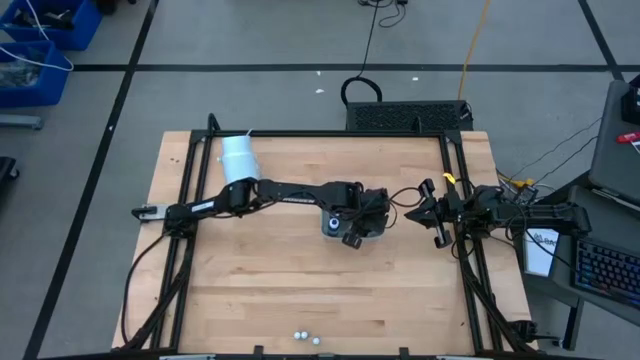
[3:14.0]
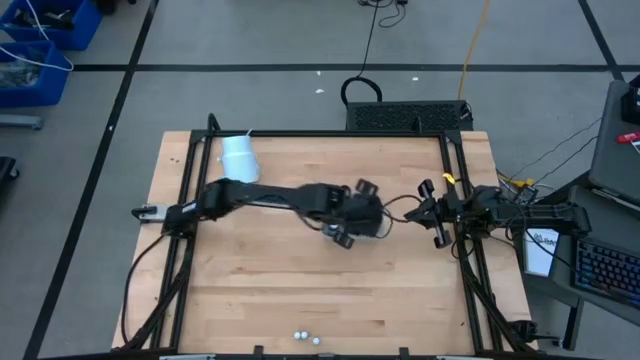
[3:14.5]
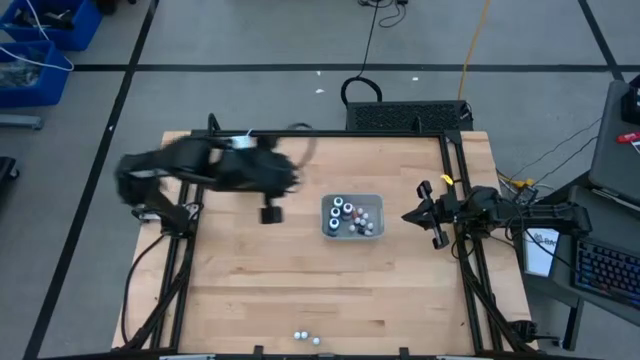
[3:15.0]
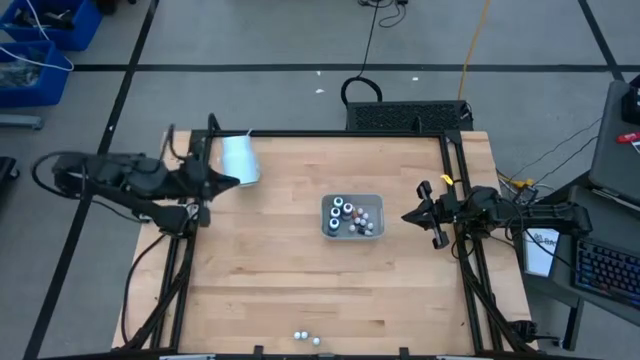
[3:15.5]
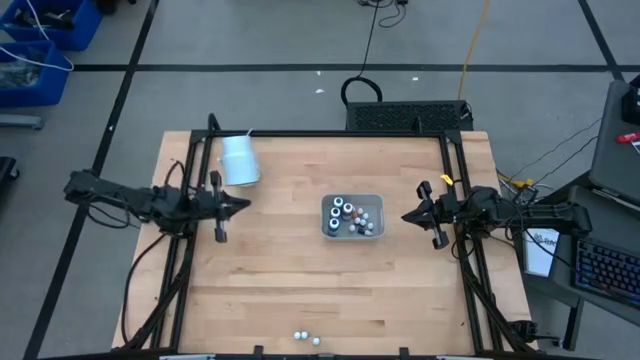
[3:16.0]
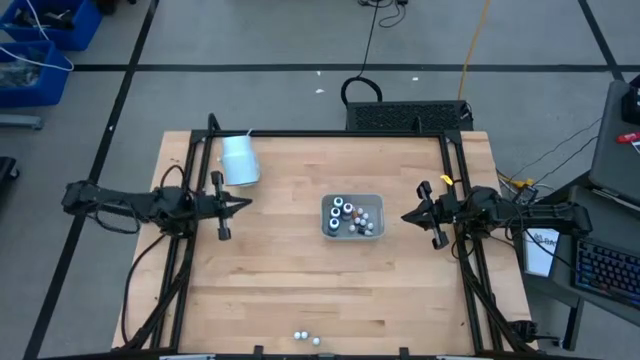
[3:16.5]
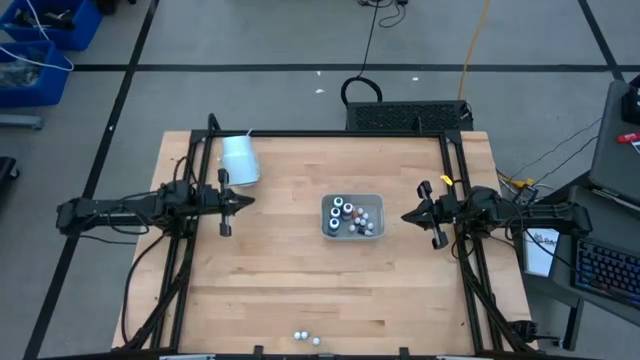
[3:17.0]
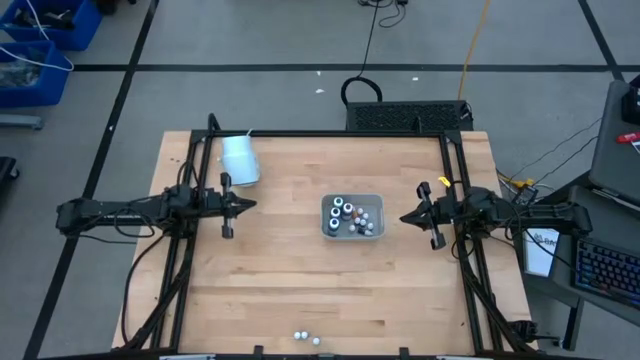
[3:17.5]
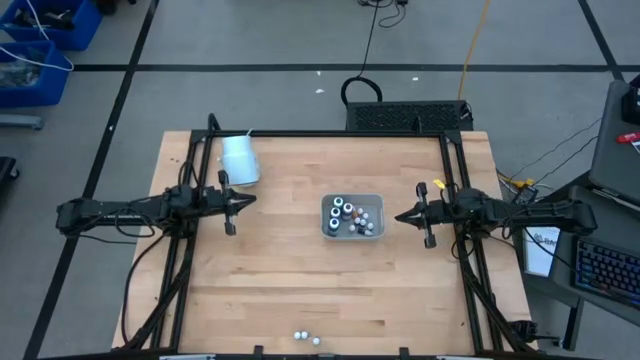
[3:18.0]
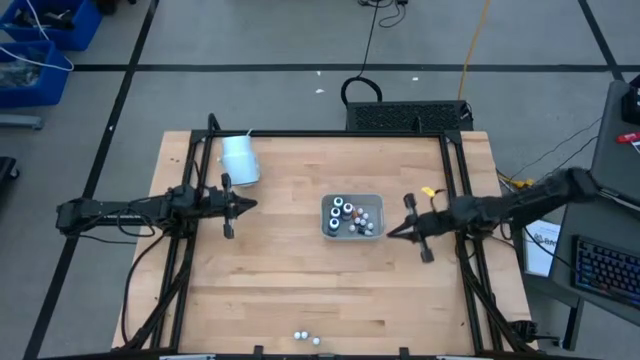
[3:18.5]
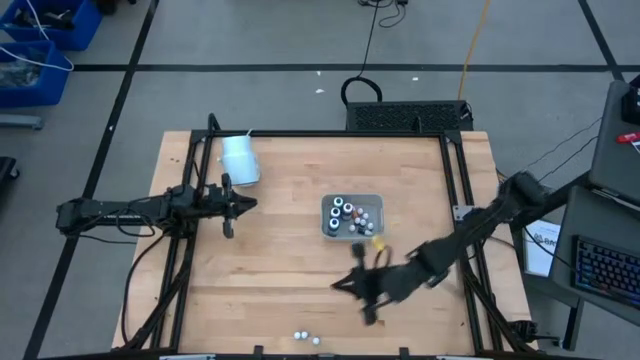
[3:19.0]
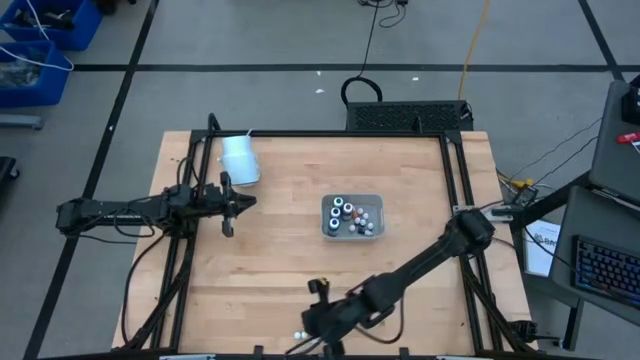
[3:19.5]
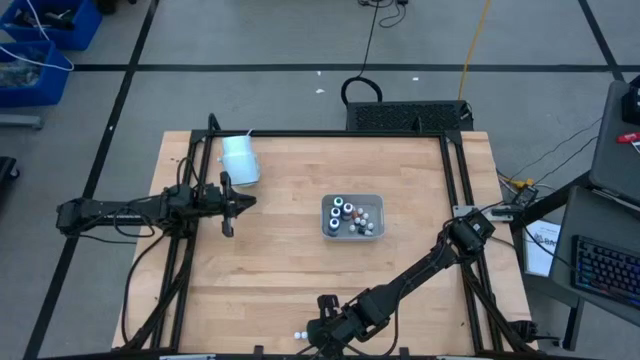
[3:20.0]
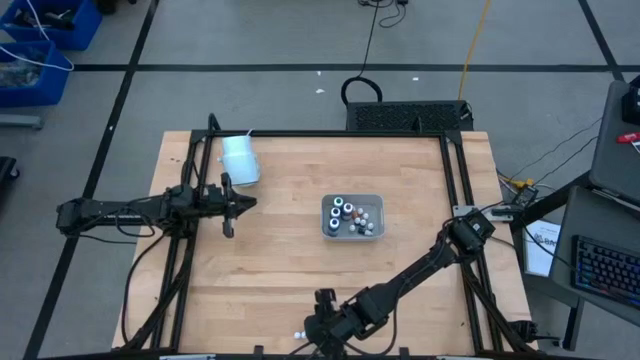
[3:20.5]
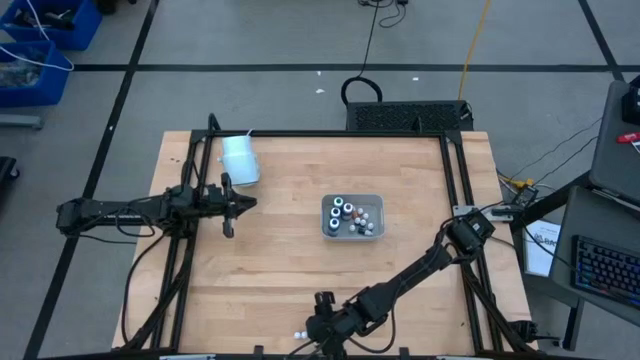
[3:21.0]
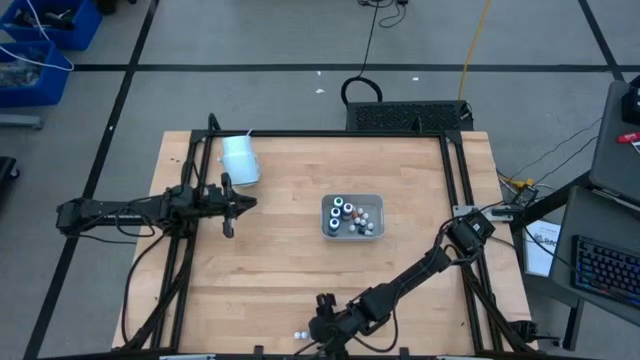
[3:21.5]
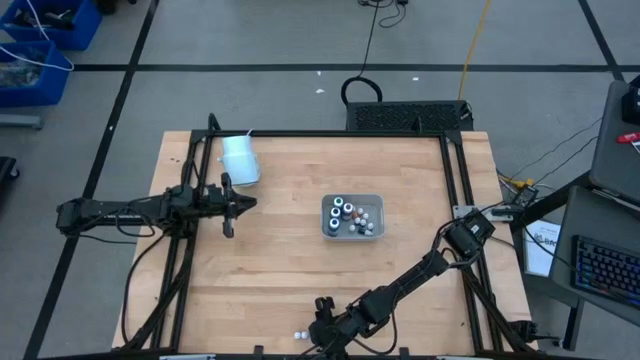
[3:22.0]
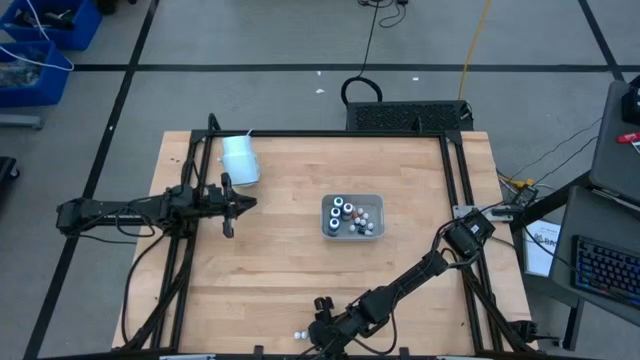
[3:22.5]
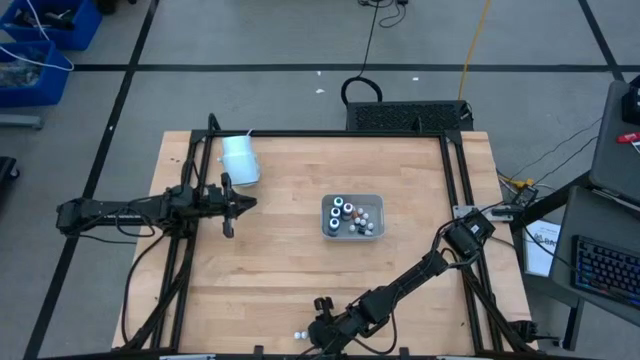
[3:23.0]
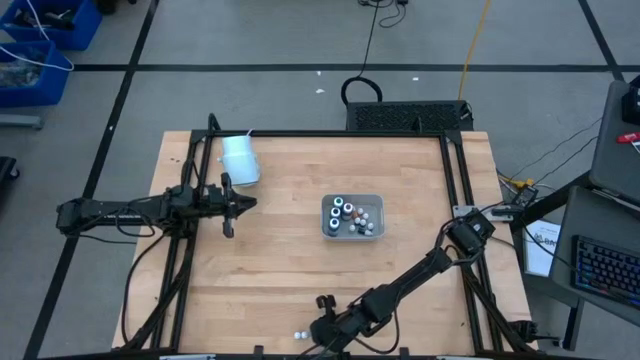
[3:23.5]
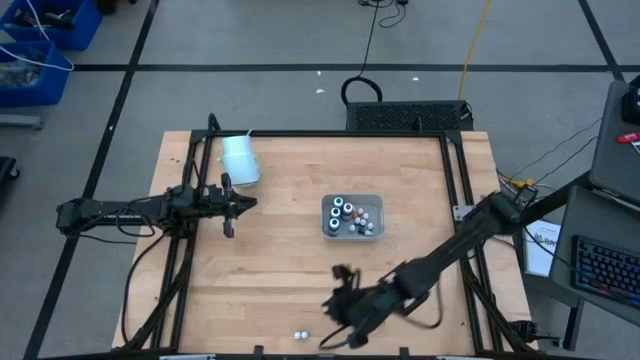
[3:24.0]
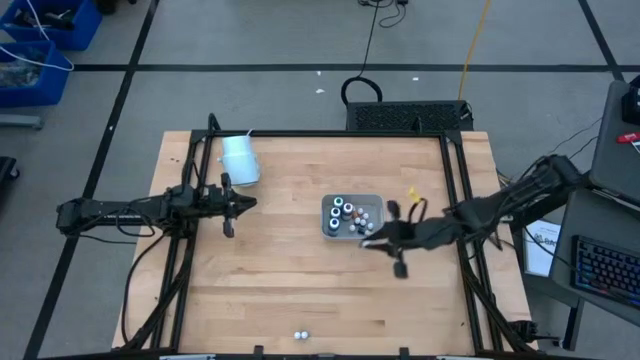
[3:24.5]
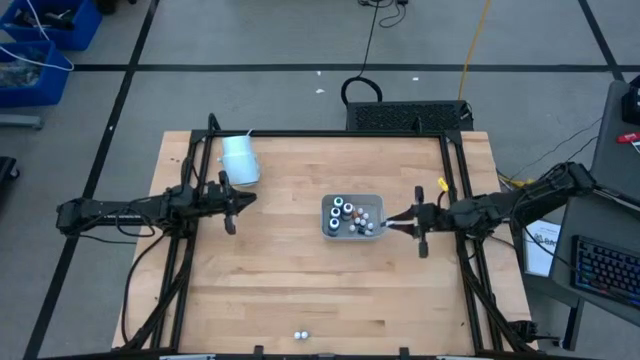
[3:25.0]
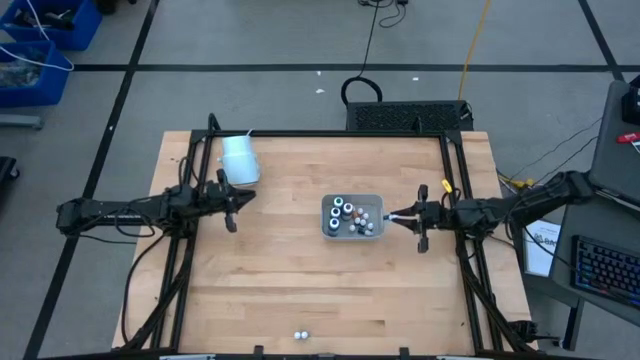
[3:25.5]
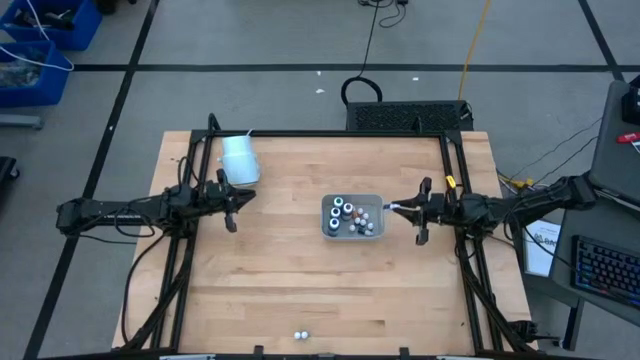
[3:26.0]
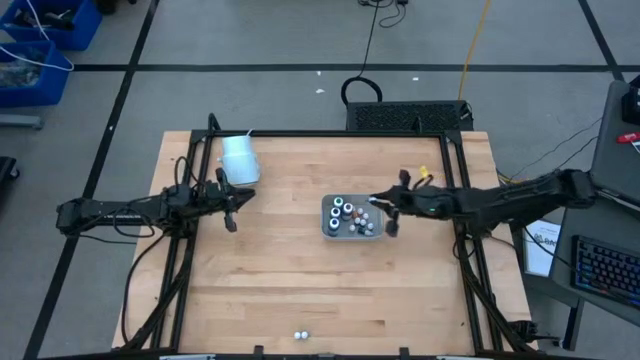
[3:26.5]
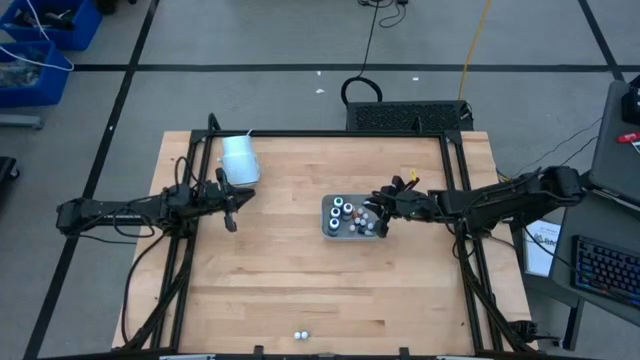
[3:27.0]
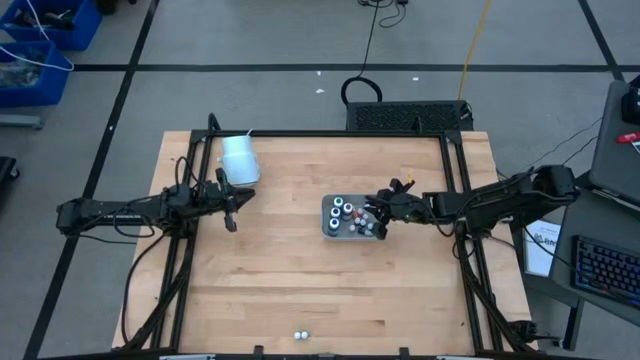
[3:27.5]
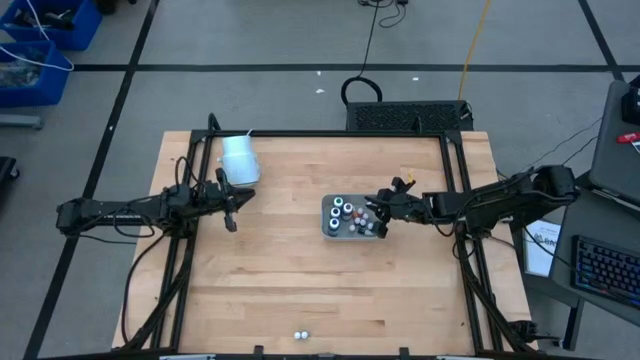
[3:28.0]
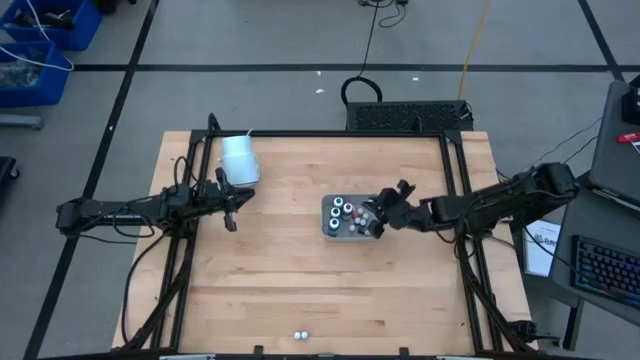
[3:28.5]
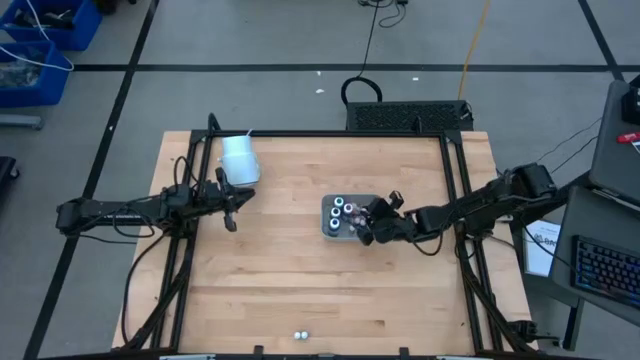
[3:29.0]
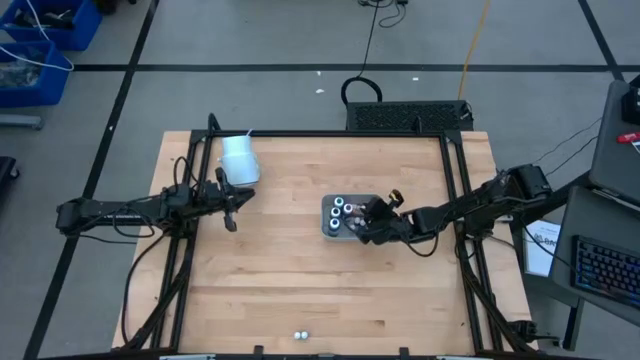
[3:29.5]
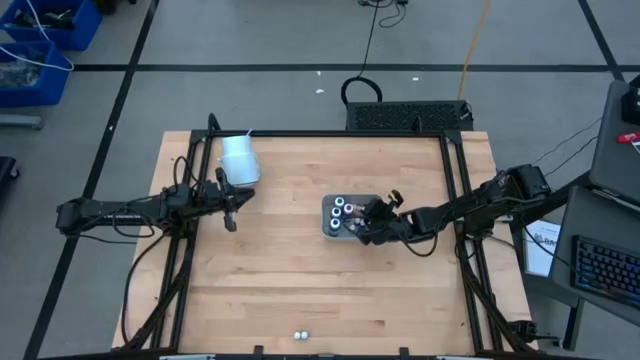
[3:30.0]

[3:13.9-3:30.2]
Task: Pick & Place food coloring
Put the bottom small blue food coloring bottle into the bin

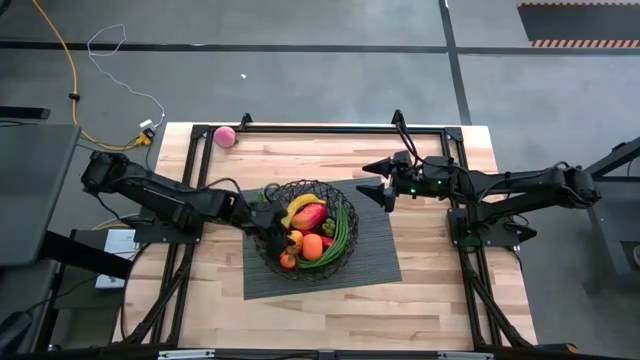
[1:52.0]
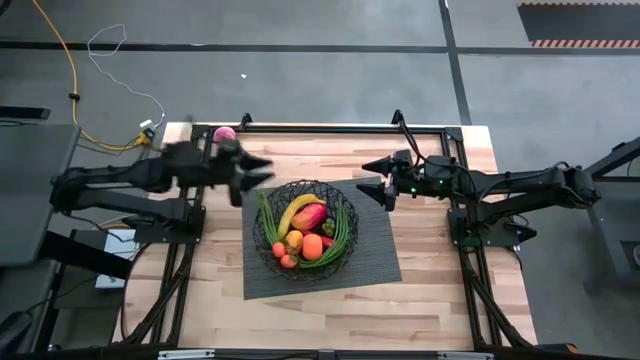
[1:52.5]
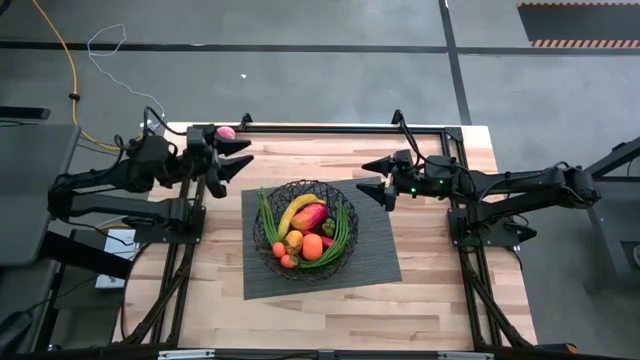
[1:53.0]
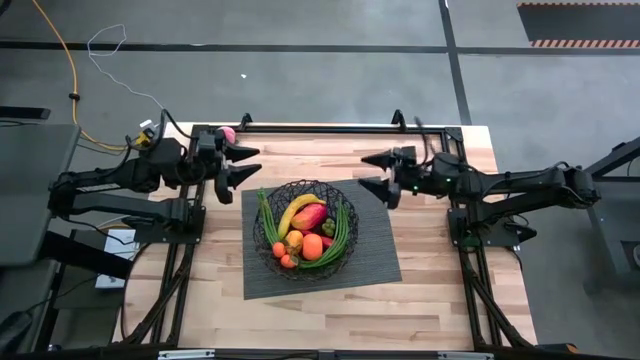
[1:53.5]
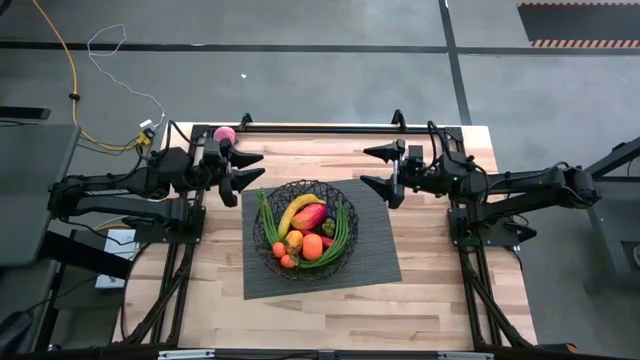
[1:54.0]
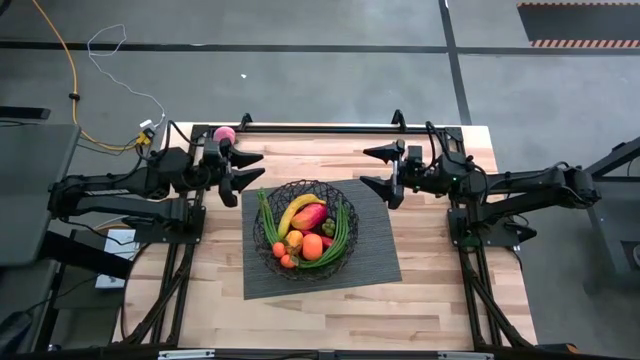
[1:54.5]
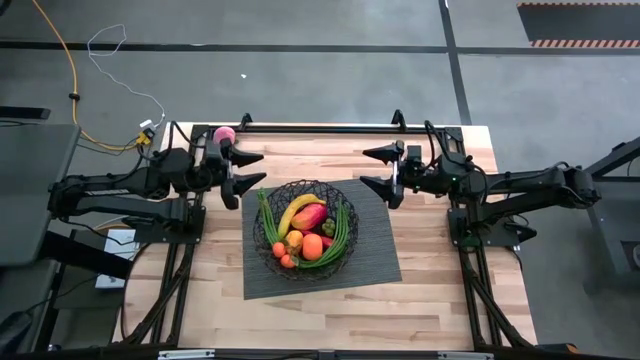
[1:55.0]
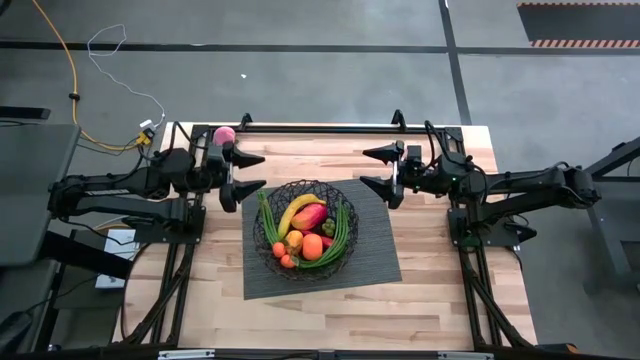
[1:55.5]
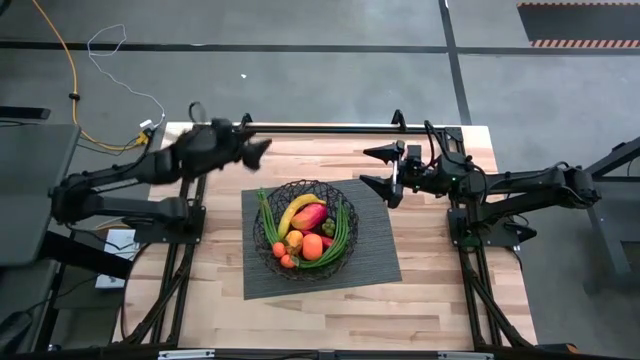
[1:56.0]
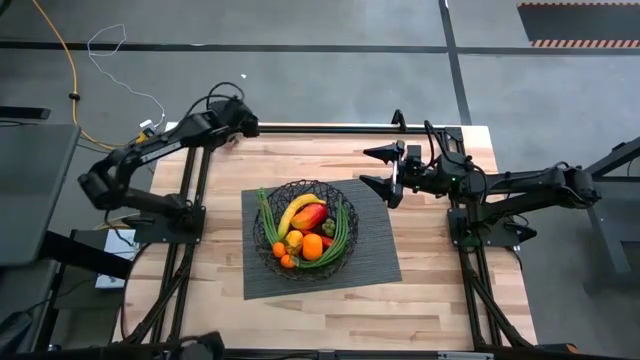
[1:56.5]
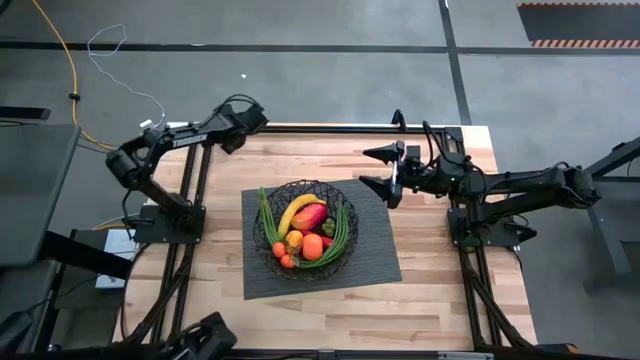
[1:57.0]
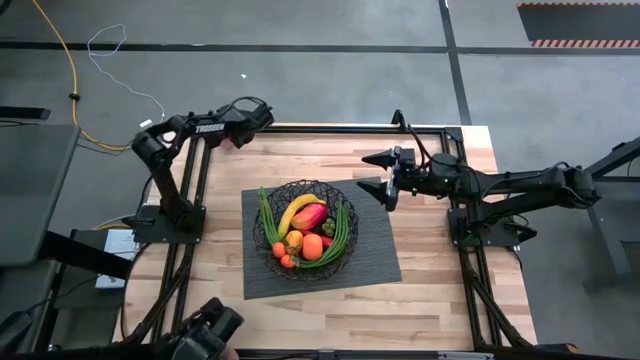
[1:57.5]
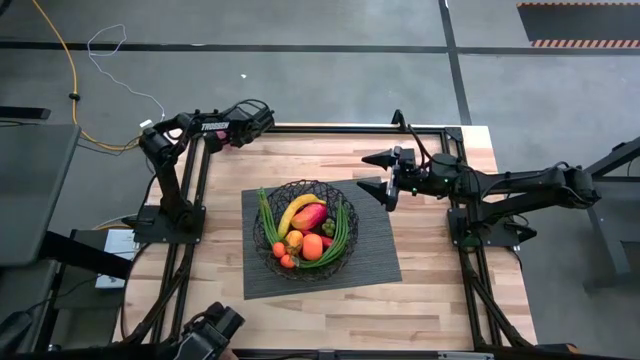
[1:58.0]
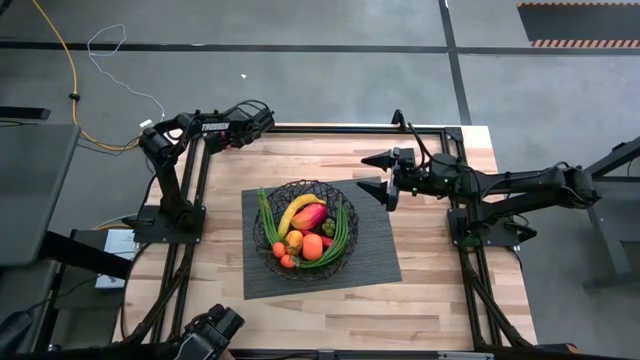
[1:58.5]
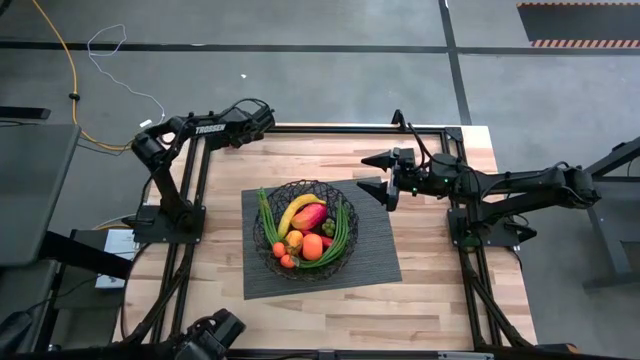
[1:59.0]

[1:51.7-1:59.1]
Task: Build produce basket
Put the pink peach into the black mesh basket
